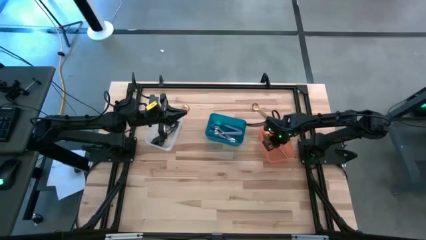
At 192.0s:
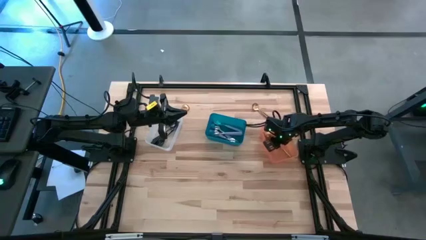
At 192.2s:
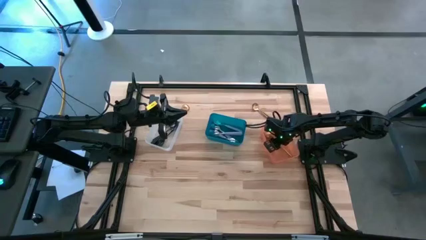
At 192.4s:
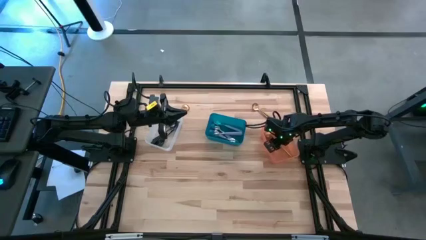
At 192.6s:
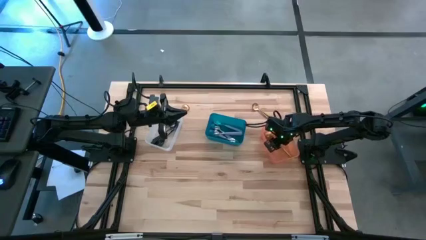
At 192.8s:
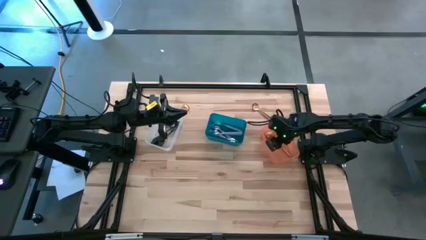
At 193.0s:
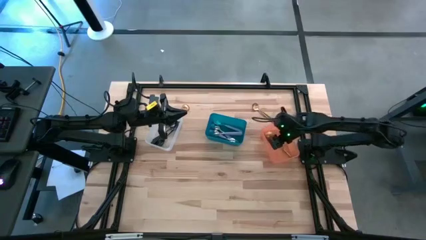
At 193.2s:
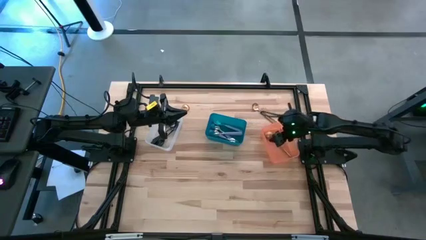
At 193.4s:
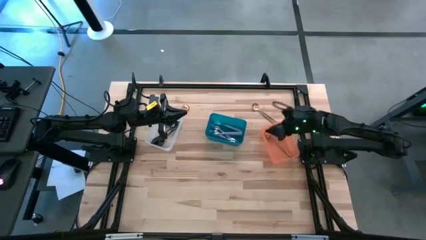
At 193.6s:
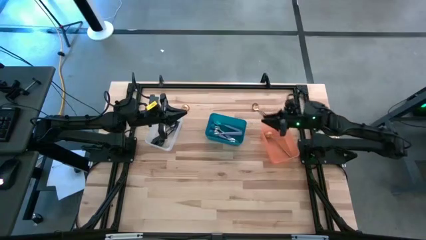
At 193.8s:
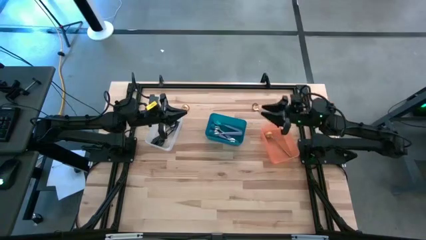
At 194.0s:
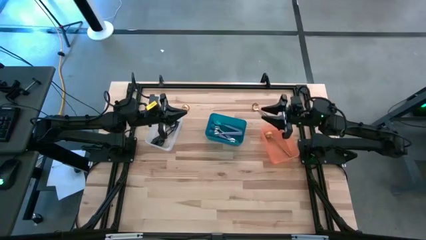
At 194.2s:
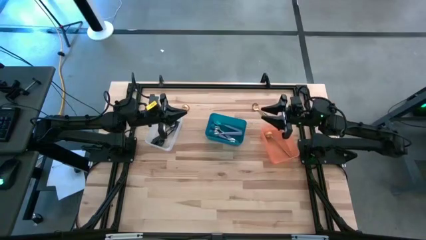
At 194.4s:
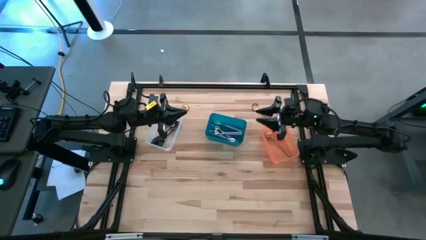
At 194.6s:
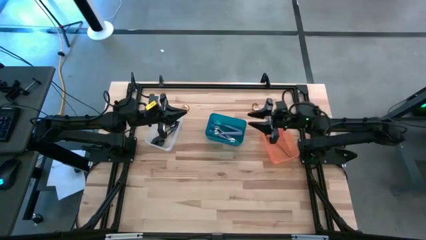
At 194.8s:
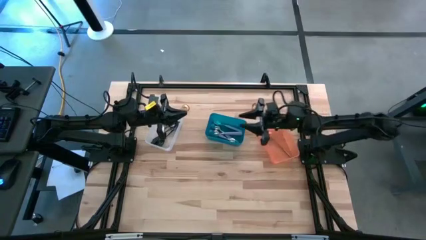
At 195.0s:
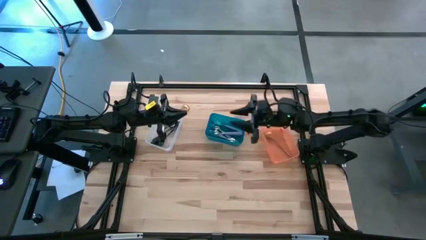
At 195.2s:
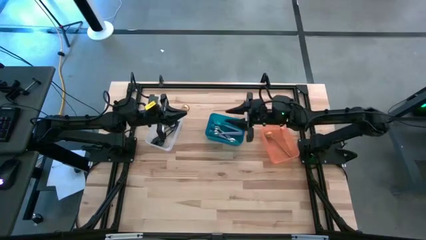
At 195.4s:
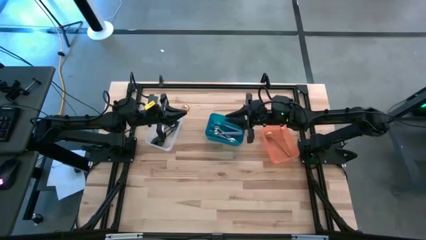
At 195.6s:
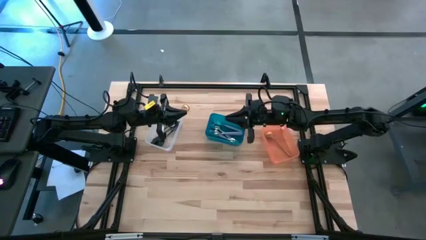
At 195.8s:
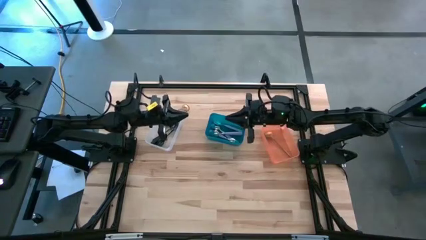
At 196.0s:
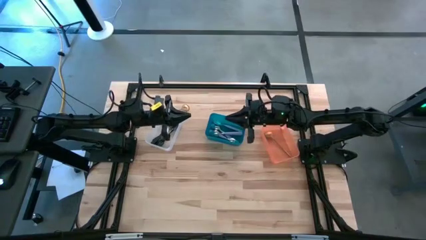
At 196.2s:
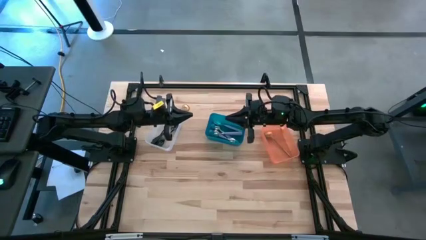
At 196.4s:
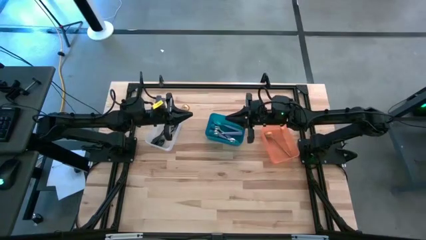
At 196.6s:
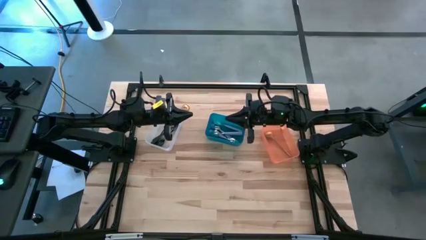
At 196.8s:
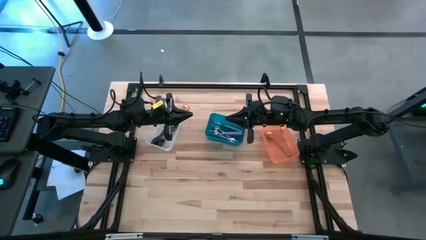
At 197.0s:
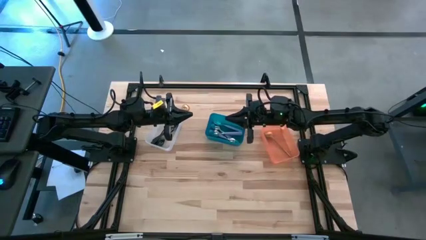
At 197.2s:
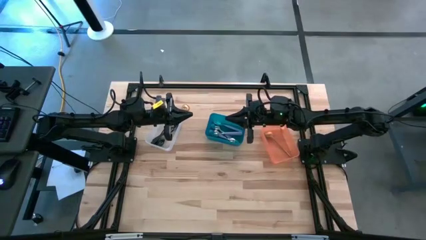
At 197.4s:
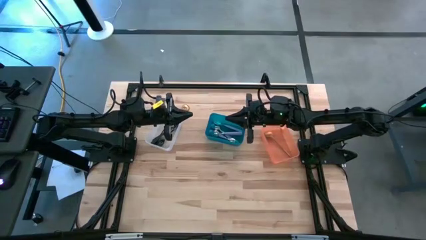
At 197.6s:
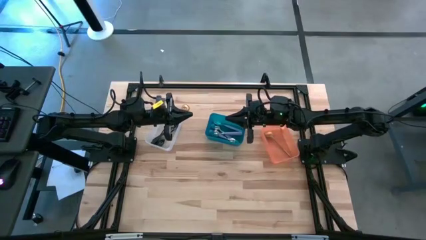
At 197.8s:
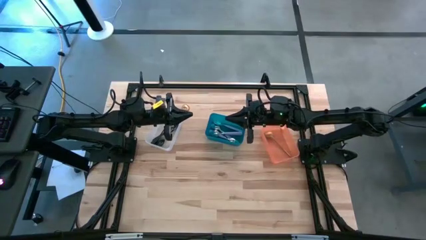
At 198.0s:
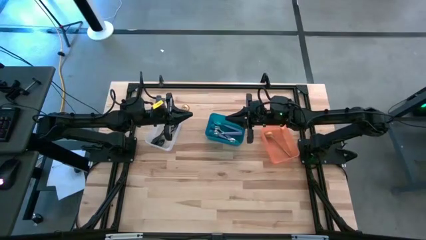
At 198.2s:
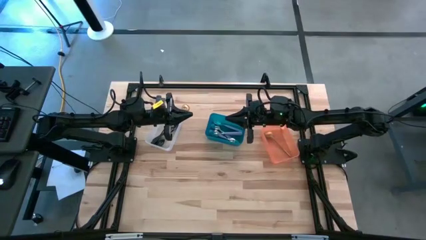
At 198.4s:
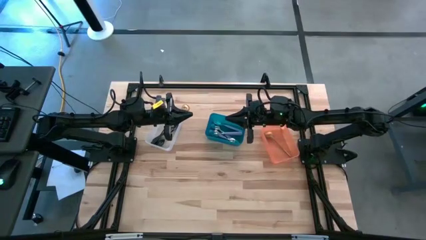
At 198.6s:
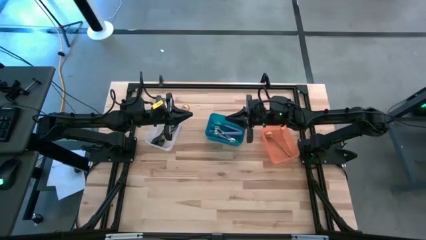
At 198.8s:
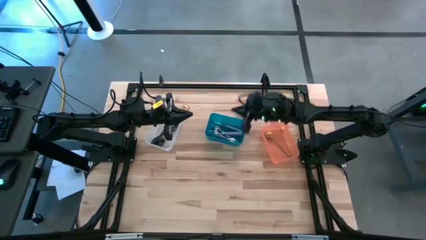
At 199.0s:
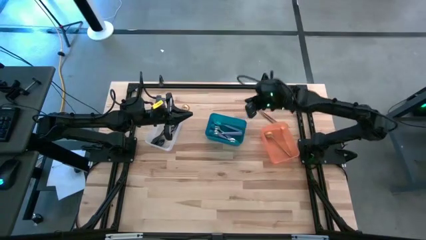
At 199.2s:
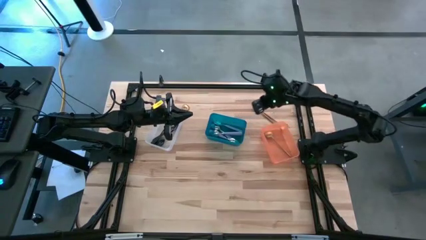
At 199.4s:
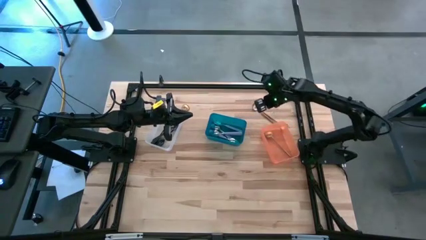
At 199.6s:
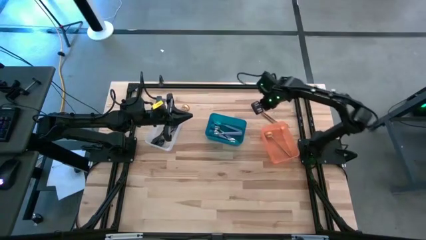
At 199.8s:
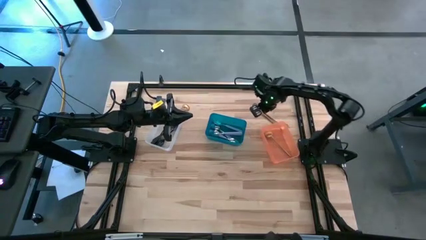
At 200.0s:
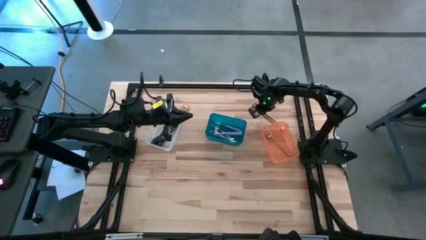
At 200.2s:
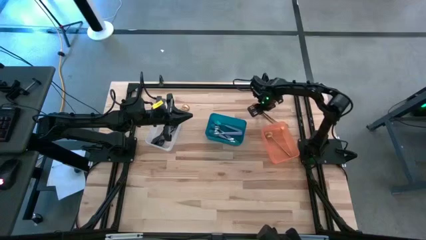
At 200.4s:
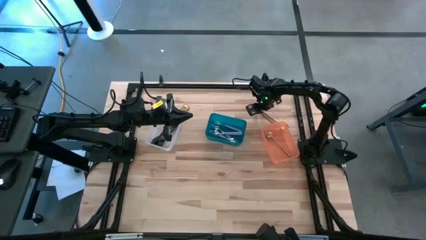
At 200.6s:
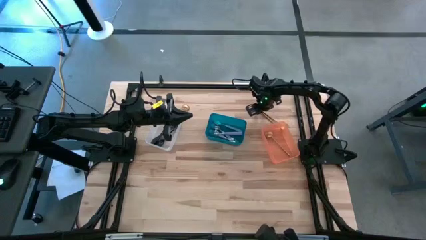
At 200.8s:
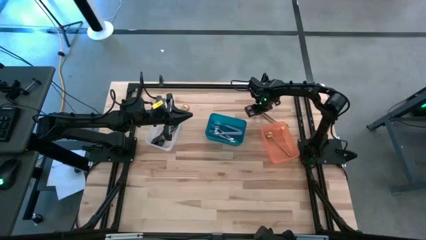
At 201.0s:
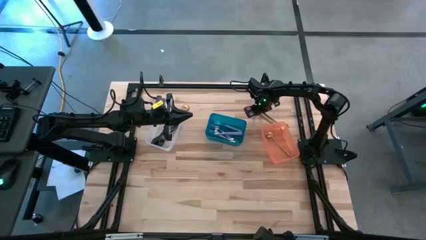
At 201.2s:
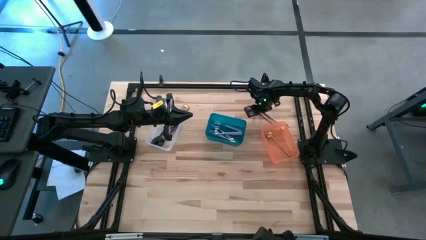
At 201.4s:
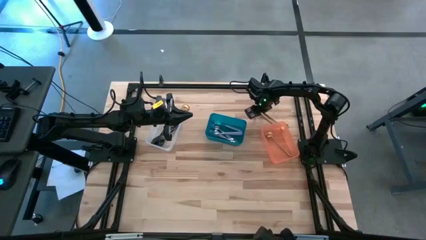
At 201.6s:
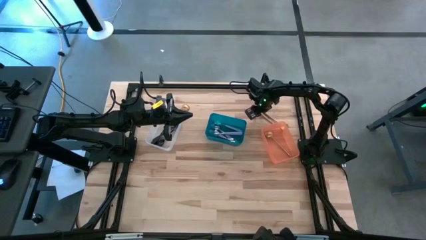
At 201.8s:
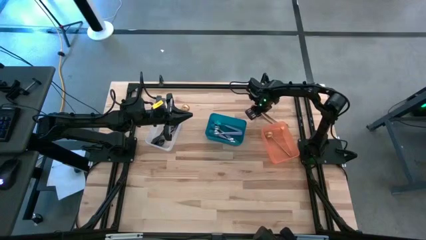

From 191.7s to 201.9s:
Task: Sort silverware by color (type)
Put the gold spoon into the orange bin
